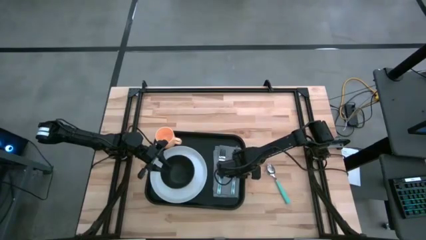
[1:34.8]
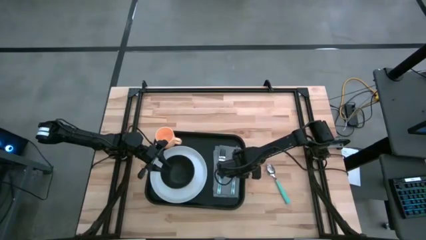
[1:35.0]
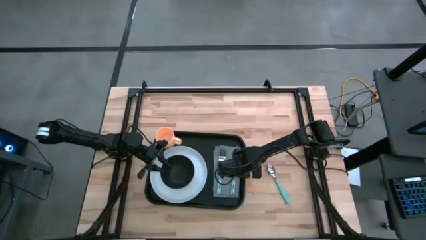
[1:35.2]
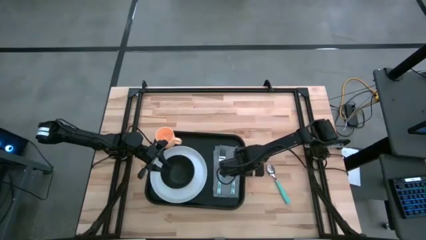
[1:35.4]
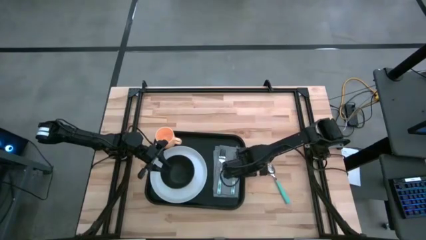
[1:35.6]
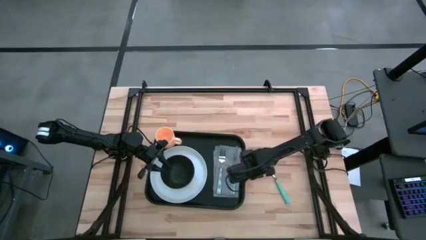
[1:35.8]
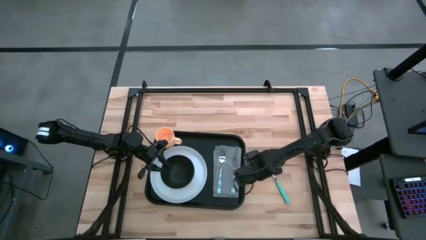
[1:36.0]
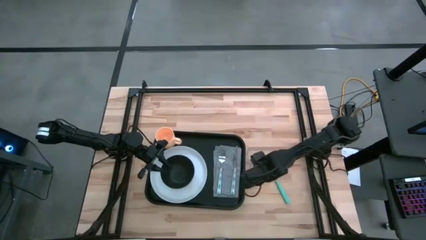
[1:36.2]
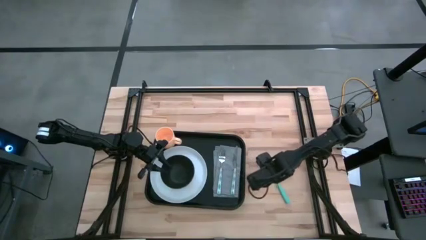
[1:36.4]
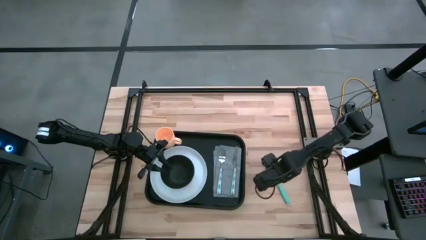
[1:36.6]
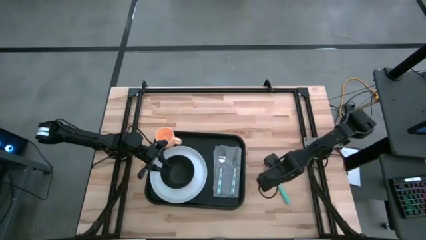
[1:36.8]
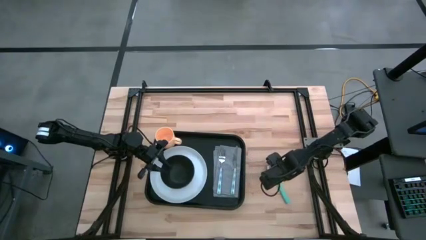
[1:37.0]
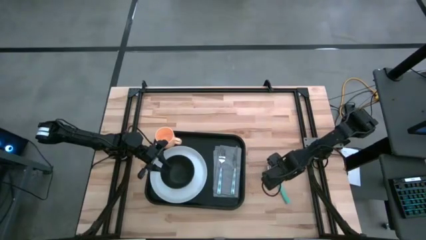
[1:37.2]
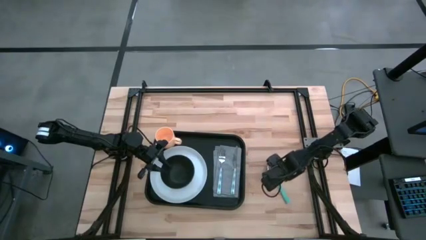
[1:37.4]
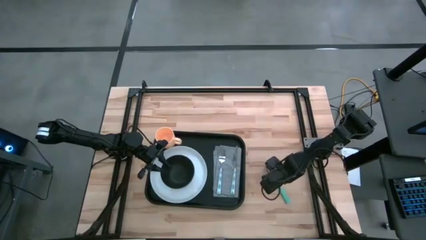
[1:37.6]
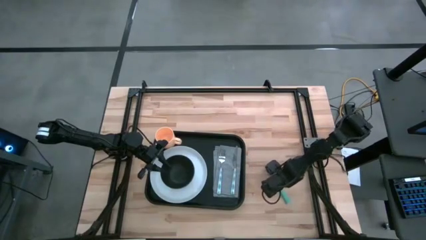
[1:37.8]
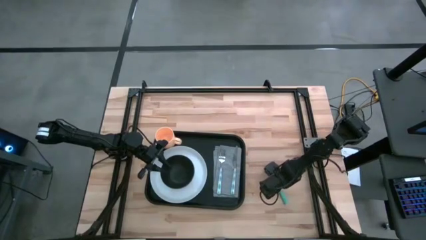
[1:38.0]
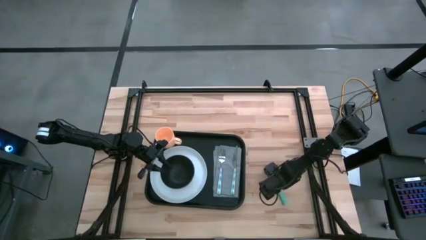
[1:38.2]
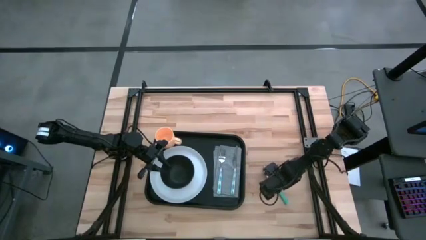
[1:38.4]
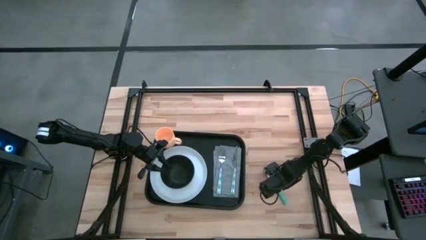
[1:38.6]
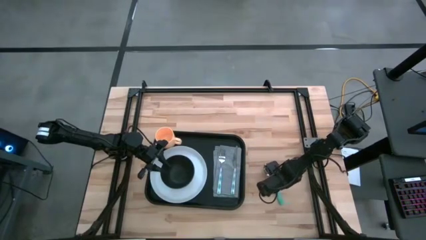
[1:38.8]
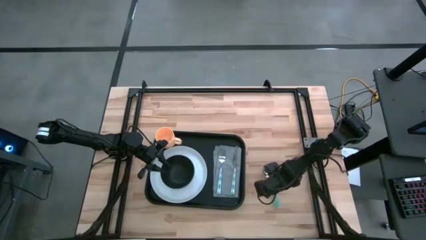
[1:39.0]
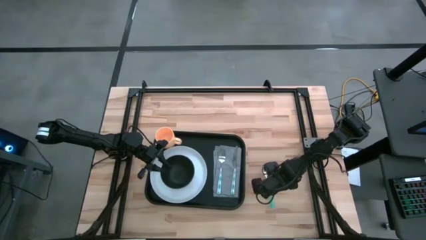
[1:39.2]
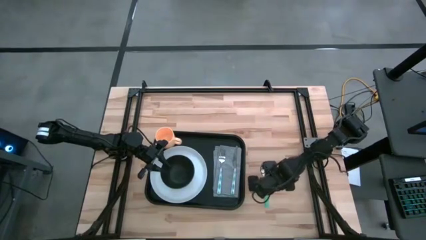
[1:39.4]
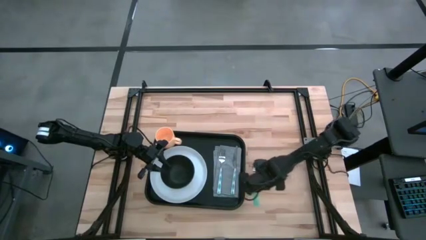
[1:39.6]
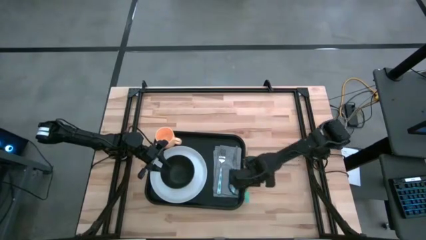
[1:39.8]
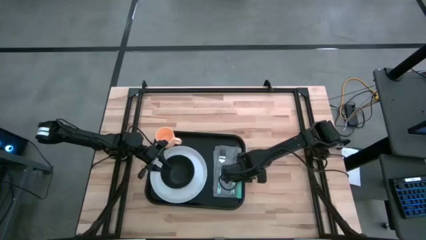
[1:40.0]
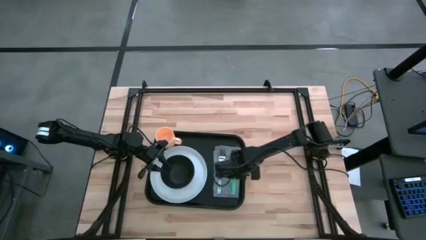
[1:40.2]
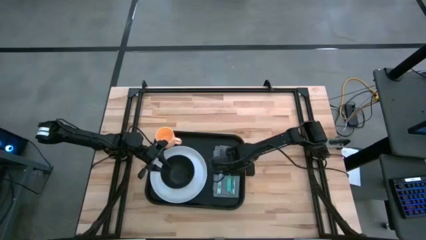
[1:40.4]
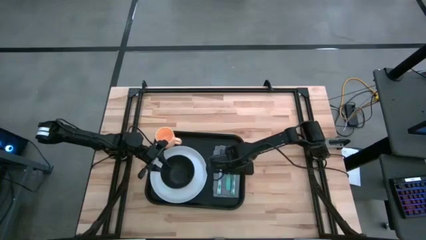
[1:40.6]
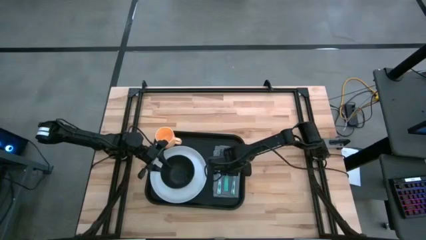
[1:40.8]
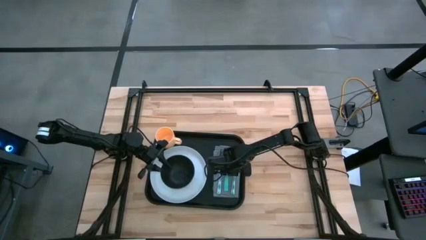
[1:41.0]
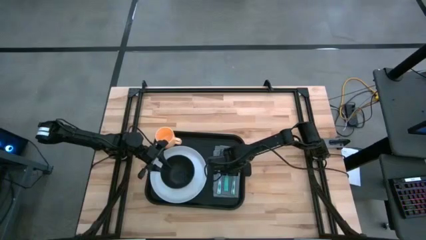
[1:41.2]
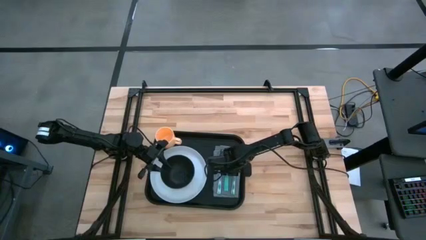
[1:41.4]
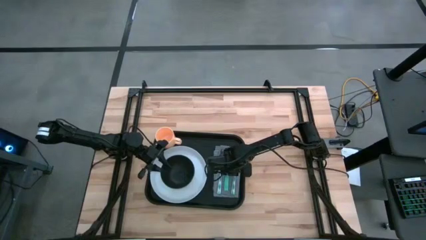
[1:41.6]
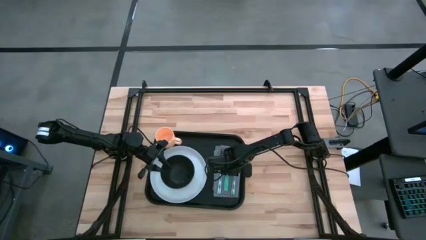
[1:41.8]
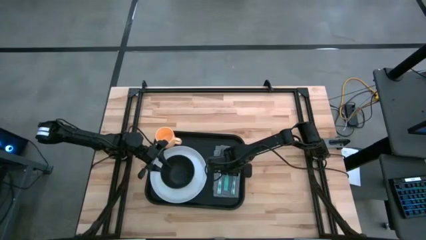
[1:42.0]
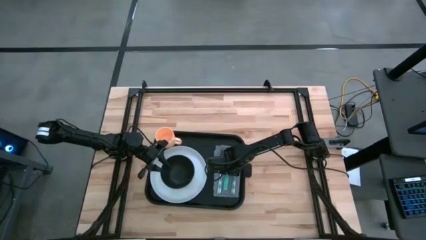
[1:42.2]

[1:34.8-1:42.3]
Task: Set up tray
Put the spoon to the right of the fork on the napkin on the serving tray

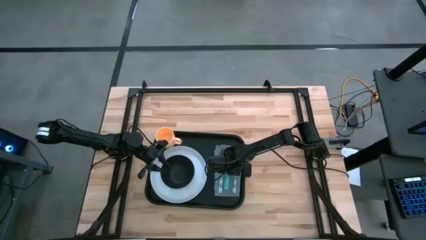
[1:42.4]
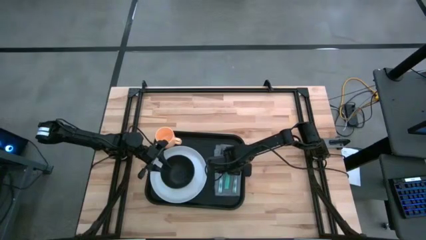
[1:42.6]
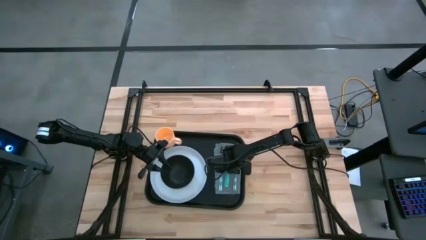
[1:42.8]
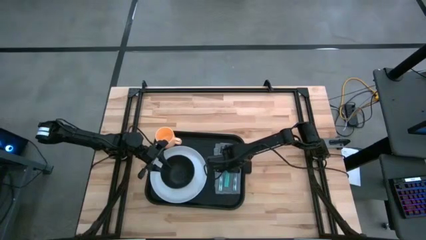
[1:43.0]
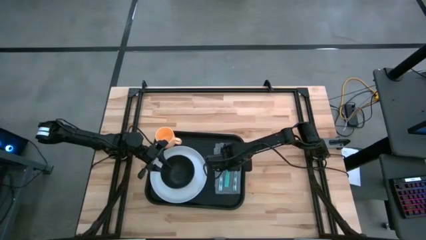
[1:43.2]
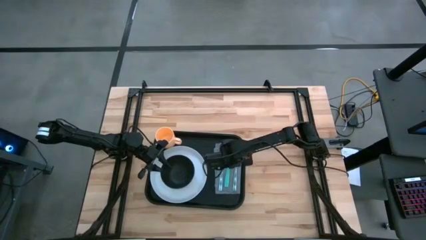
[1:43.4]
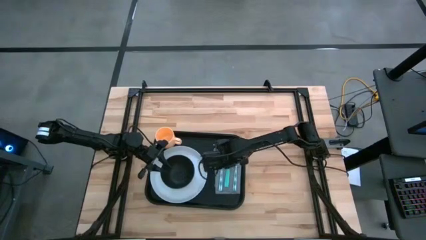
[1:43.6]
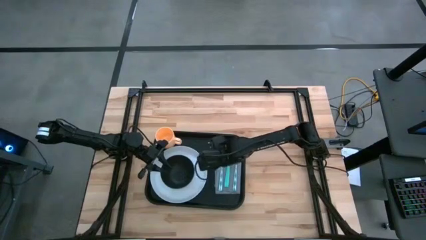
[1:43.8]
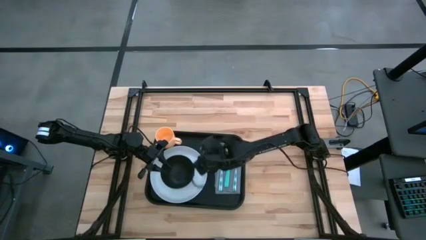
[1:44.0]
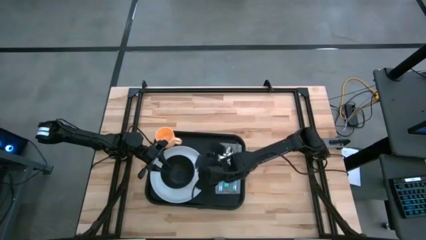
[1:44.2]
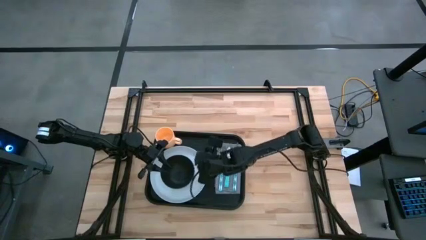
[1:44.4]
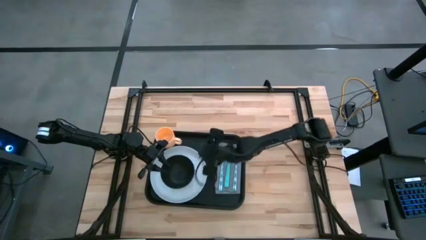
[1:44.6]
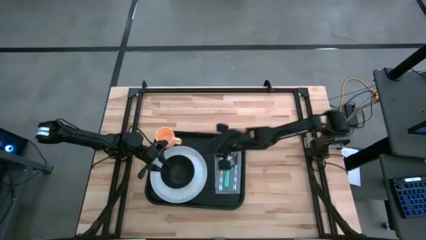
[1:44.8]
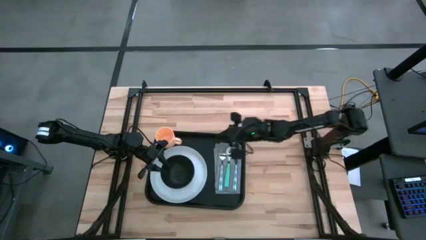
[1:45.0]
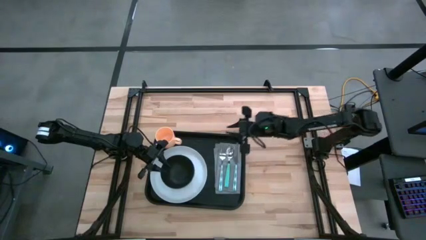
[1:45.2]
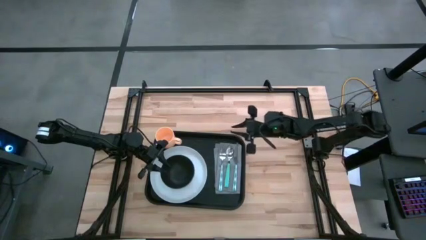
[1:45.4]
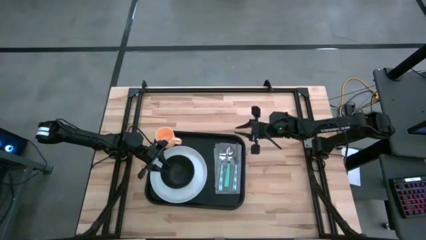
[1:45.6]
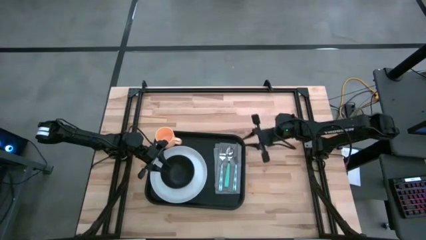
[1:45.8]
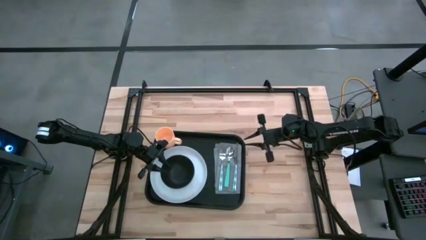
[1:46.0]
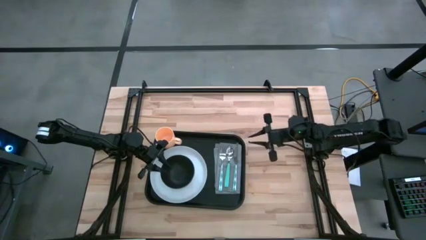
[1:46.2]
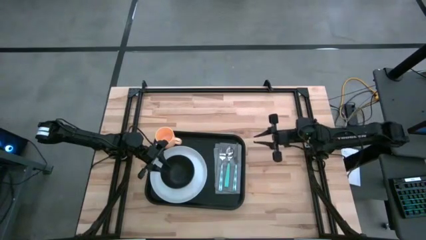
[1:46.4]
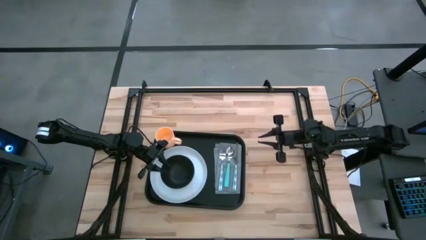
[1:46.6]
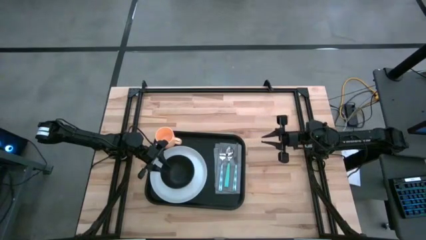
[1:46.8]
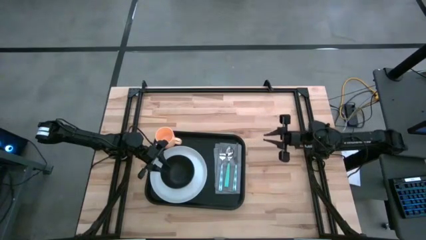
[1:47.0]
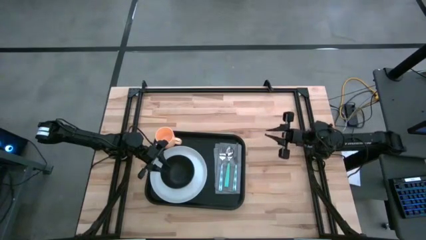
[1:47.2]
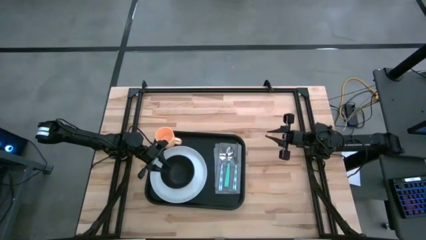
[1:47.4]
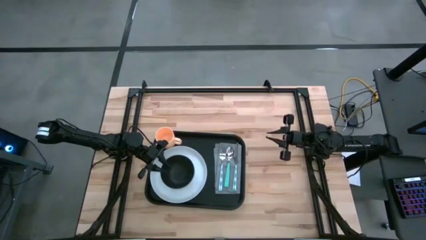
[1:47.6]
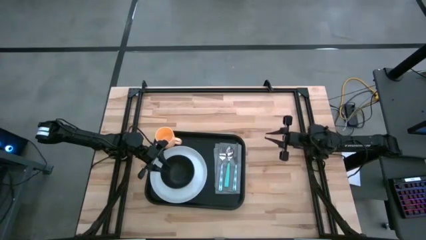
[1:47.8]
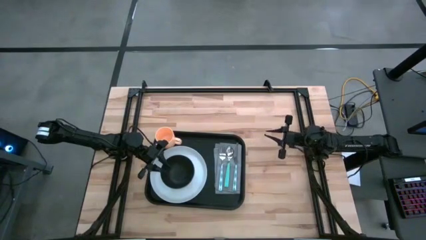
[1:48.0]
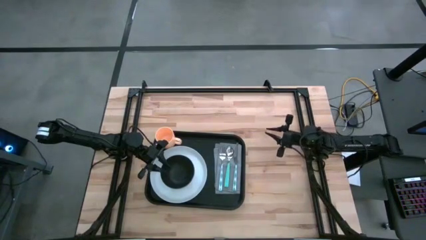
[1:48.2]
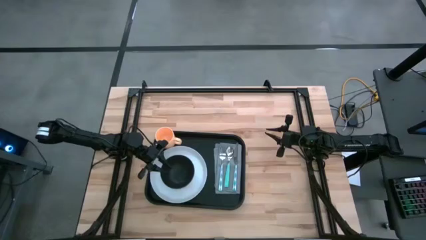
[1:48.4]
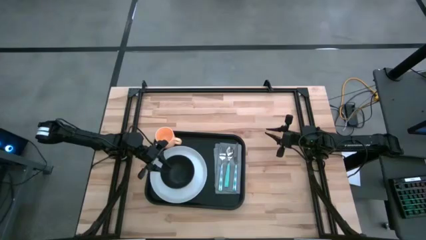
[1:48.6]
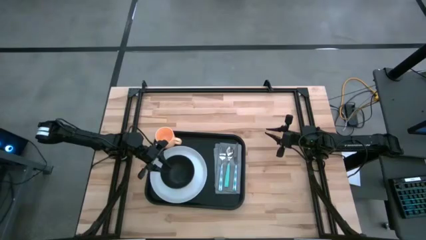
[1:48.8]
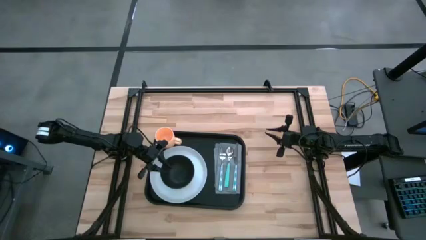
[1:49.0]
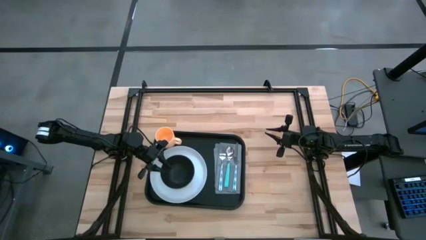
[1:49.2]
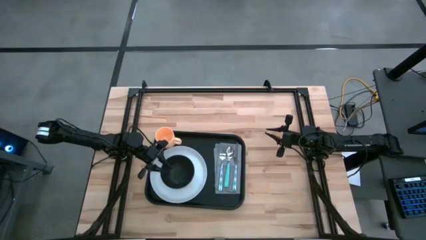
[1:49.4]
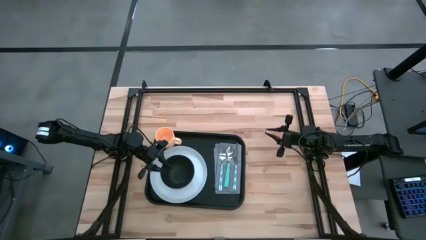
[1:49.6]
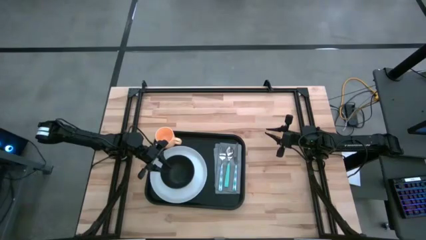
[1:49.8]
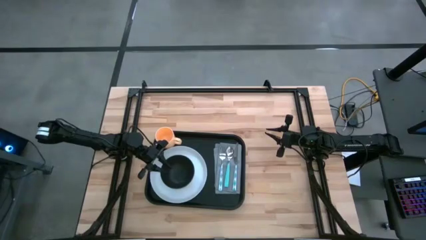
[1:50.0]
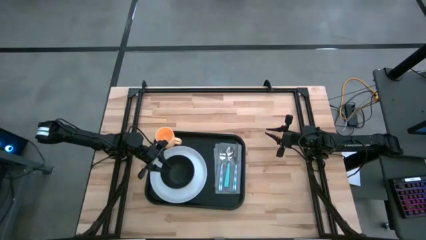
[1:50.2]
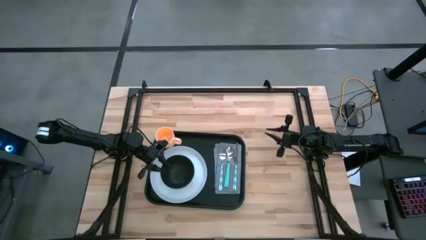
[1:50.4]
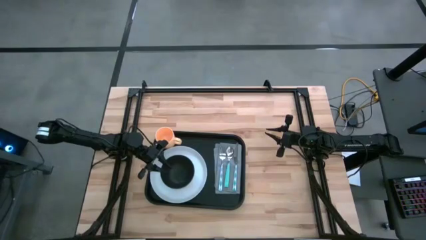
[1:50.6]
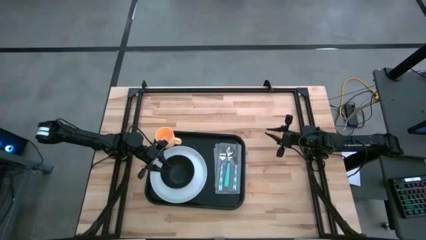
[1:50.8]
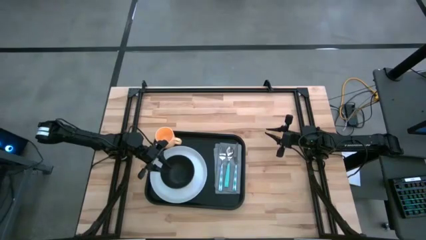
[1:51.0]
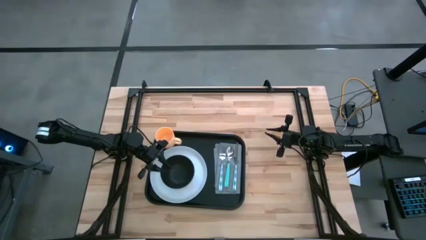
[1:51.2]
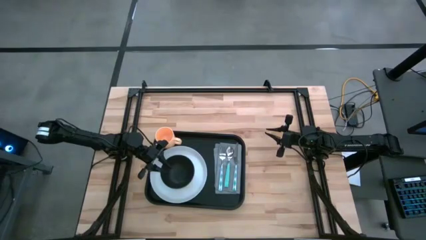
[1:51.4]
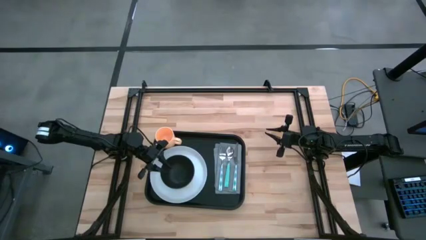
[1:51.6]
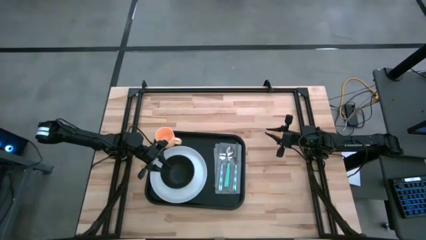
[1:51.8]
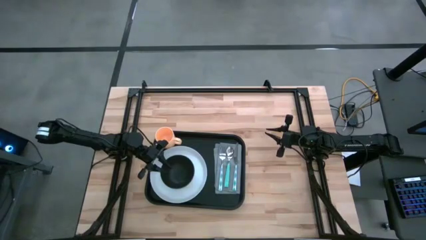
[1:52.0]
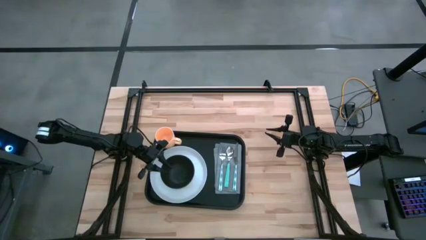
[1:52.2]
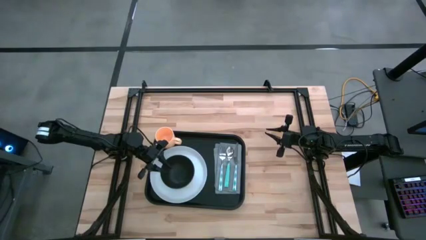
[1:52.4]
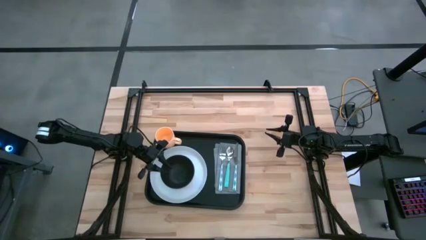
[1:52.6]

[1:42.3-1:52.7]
Return to Home Position
